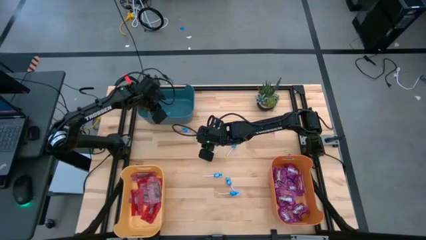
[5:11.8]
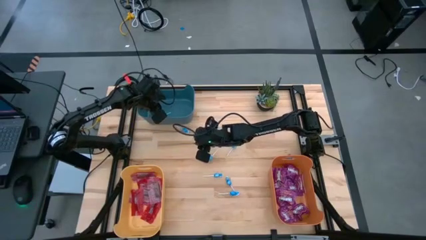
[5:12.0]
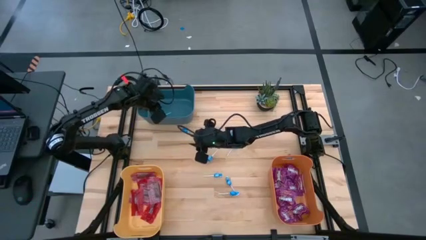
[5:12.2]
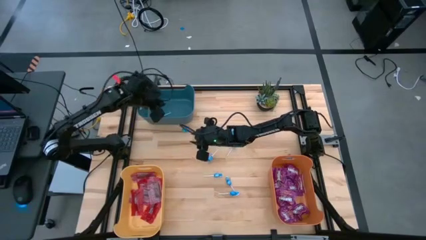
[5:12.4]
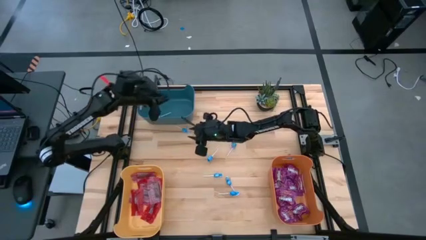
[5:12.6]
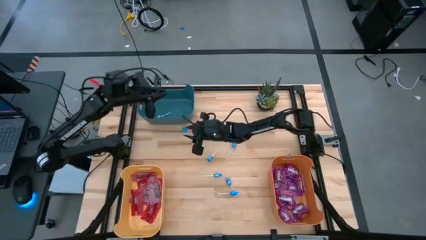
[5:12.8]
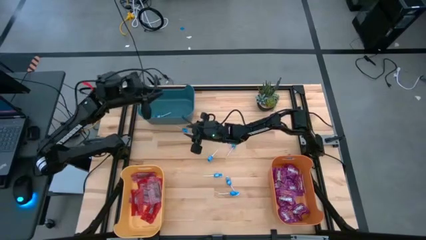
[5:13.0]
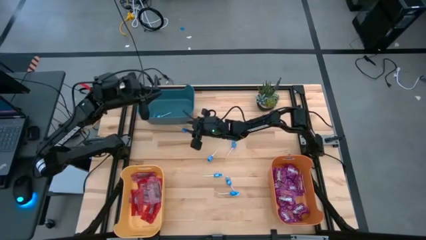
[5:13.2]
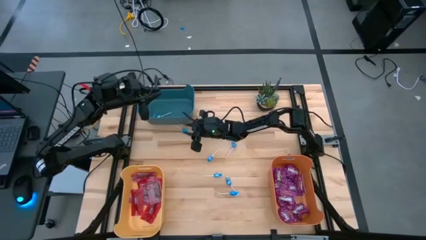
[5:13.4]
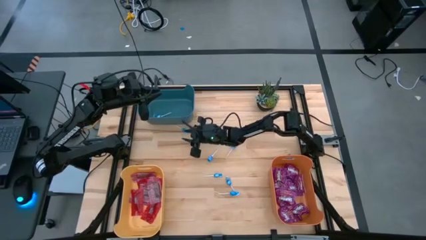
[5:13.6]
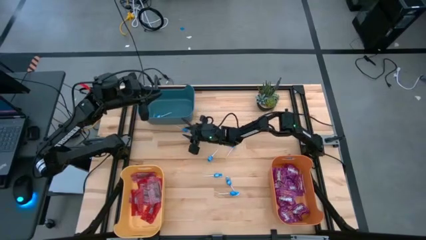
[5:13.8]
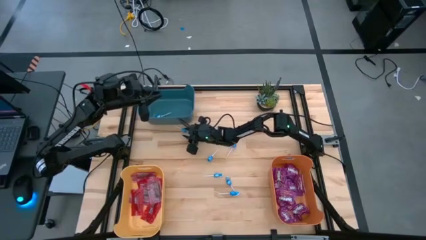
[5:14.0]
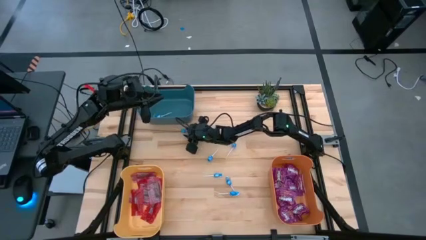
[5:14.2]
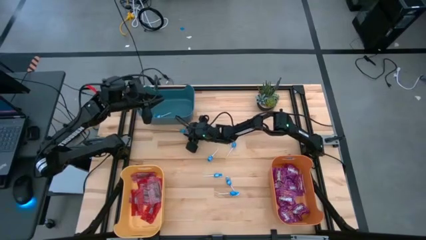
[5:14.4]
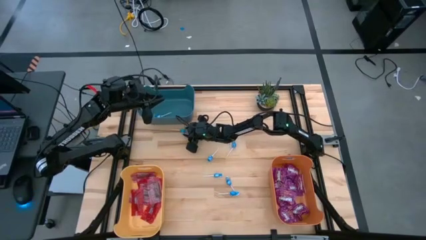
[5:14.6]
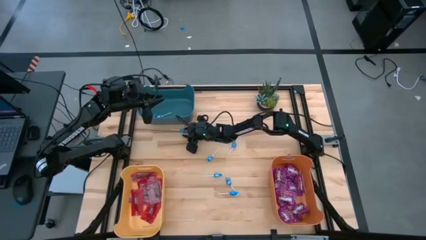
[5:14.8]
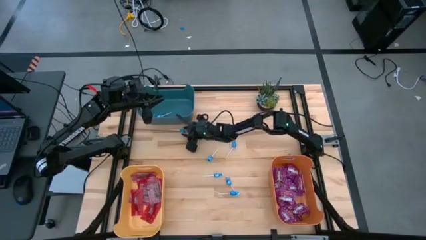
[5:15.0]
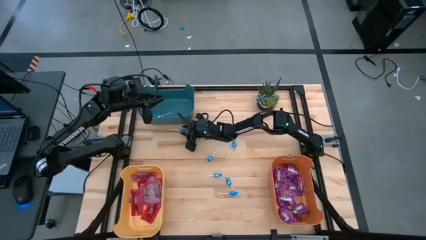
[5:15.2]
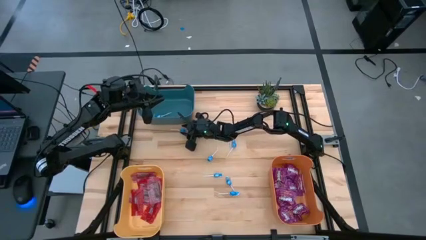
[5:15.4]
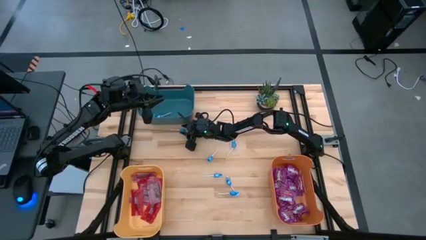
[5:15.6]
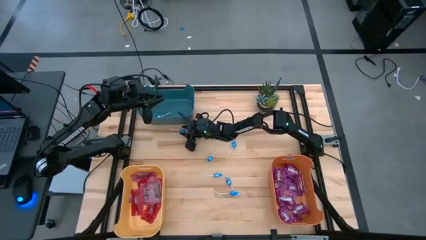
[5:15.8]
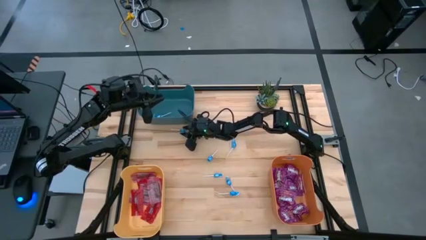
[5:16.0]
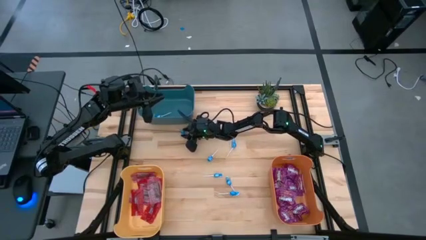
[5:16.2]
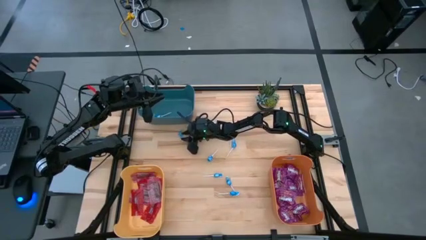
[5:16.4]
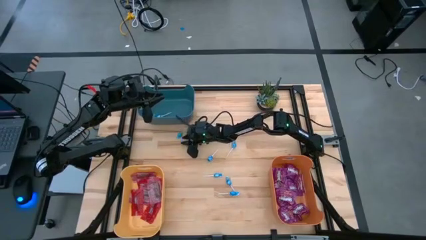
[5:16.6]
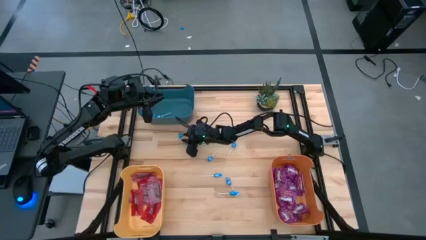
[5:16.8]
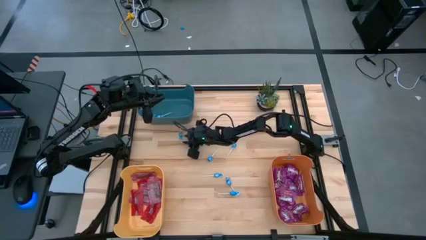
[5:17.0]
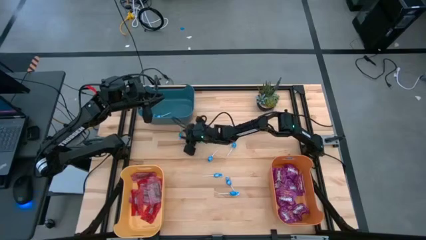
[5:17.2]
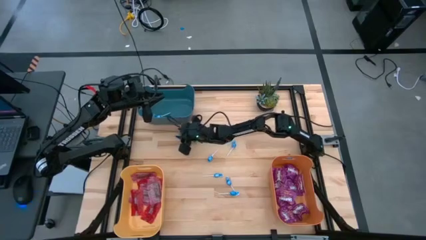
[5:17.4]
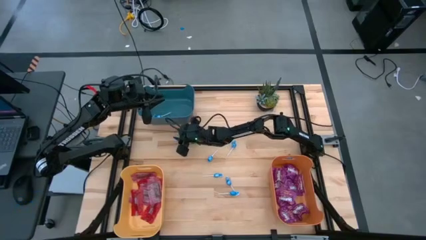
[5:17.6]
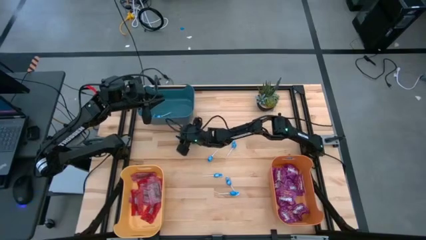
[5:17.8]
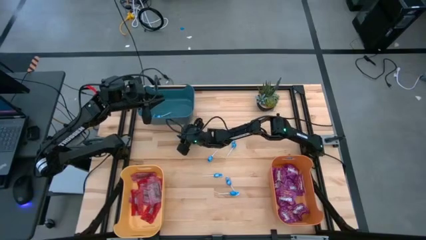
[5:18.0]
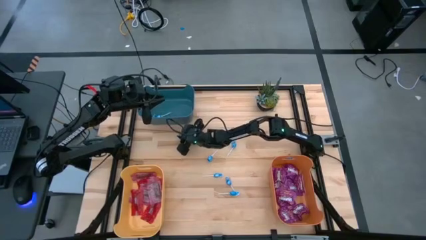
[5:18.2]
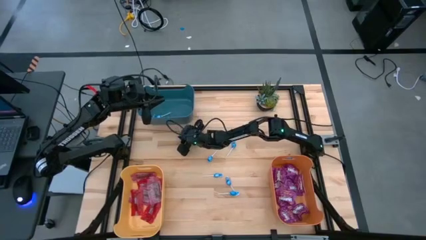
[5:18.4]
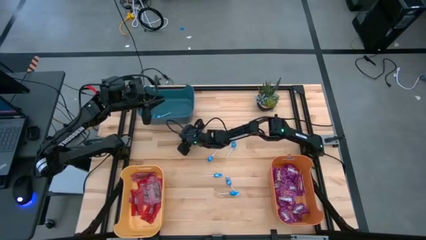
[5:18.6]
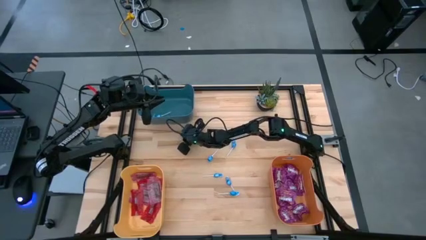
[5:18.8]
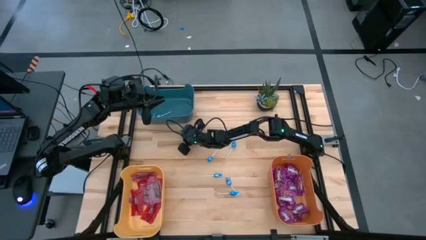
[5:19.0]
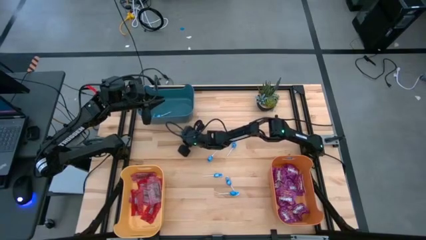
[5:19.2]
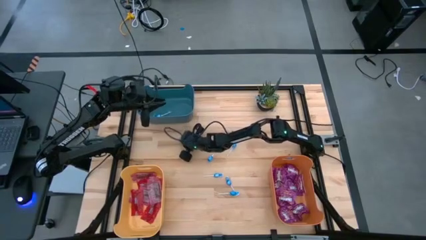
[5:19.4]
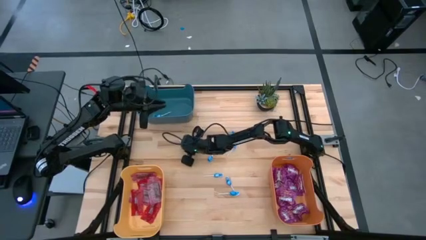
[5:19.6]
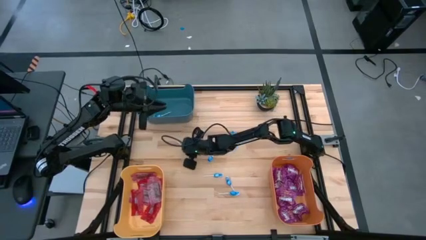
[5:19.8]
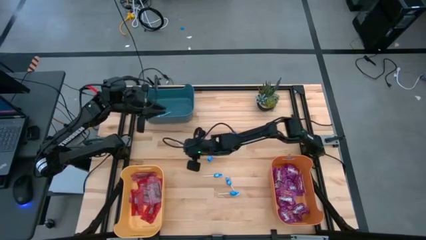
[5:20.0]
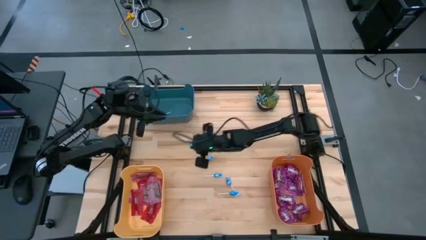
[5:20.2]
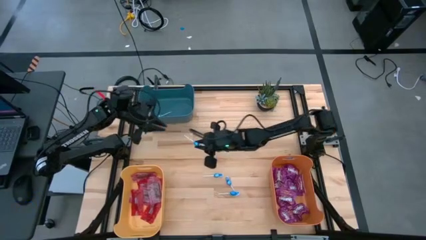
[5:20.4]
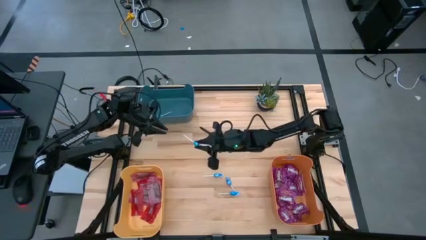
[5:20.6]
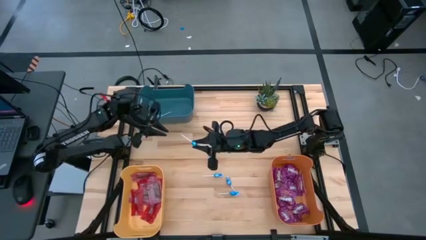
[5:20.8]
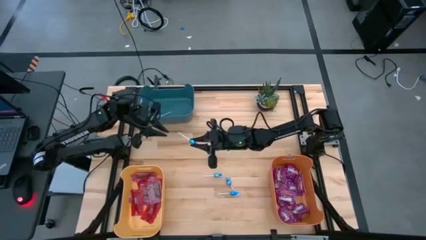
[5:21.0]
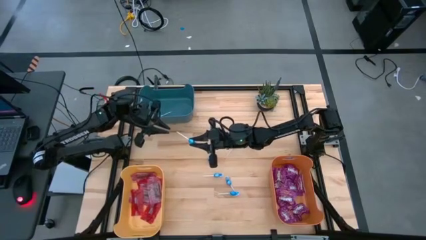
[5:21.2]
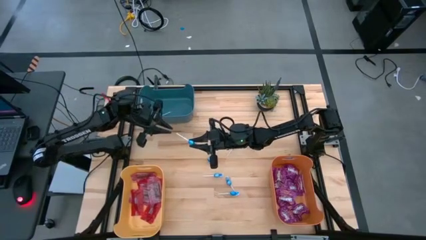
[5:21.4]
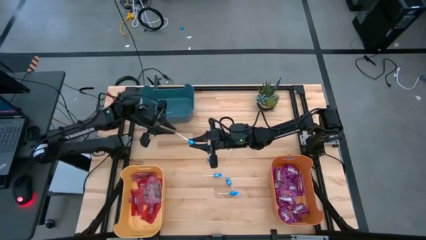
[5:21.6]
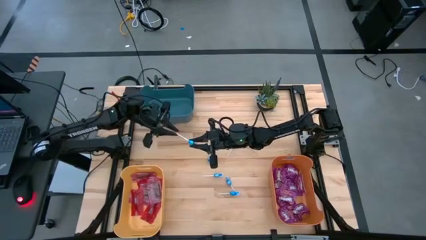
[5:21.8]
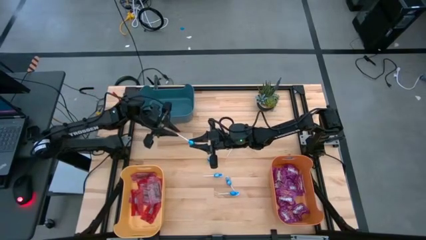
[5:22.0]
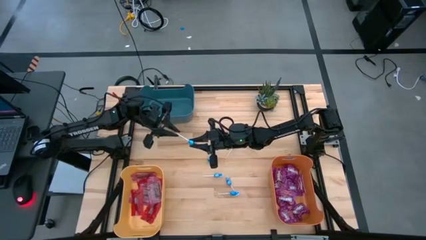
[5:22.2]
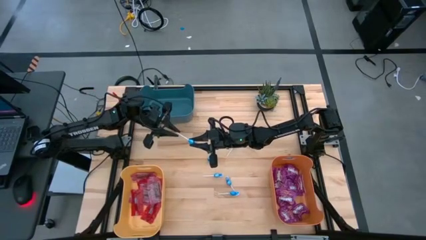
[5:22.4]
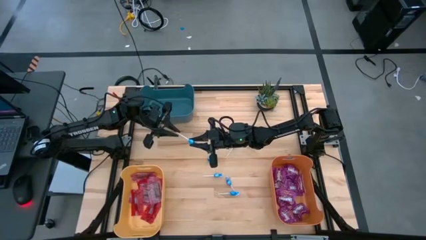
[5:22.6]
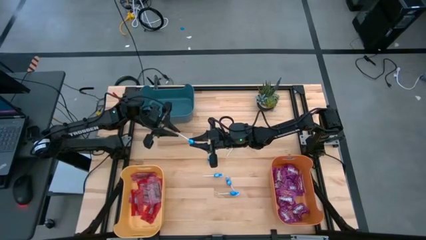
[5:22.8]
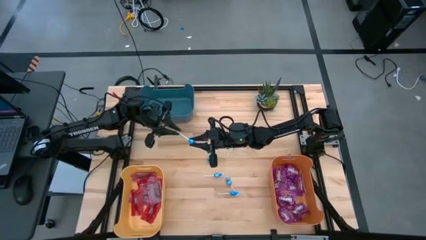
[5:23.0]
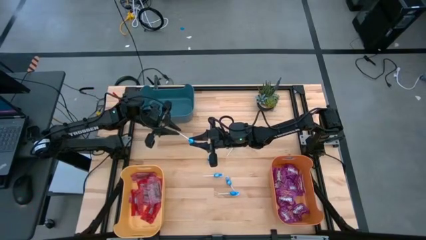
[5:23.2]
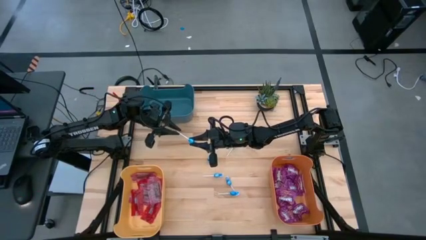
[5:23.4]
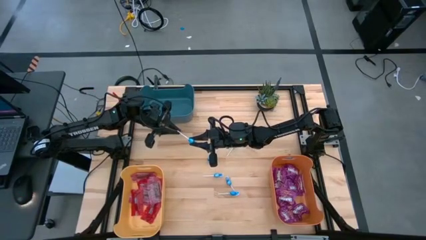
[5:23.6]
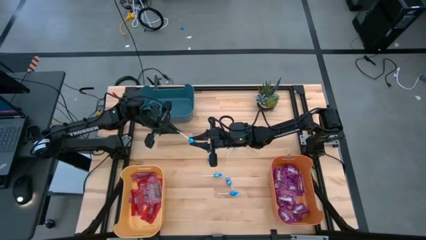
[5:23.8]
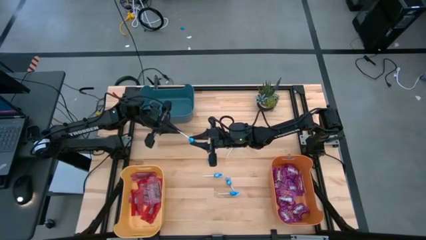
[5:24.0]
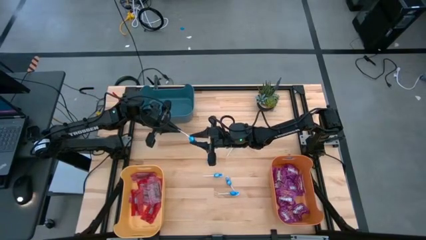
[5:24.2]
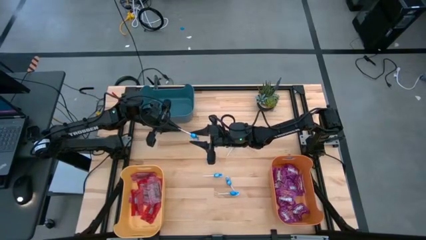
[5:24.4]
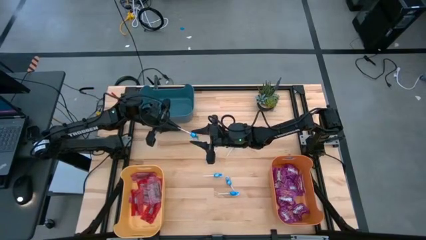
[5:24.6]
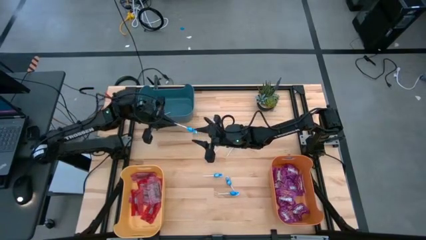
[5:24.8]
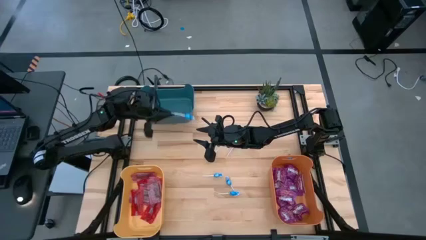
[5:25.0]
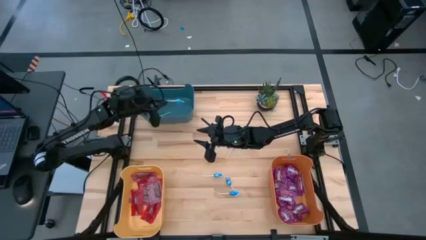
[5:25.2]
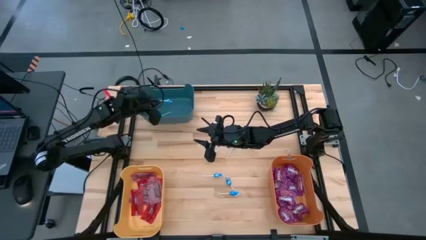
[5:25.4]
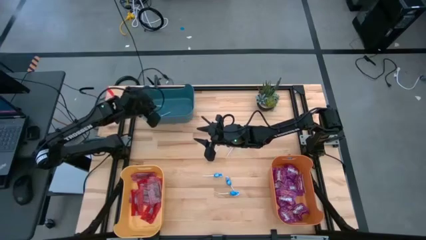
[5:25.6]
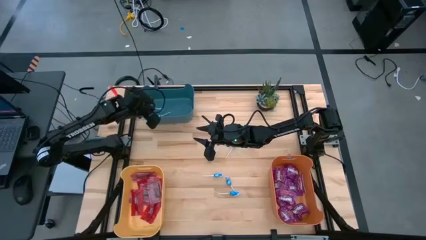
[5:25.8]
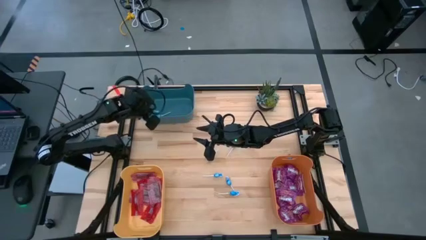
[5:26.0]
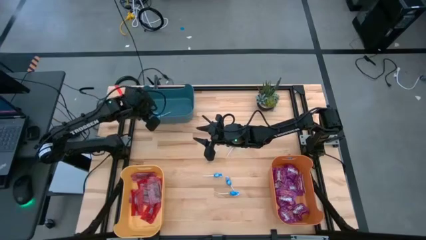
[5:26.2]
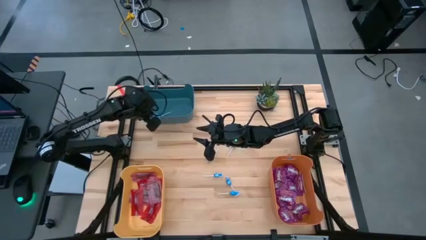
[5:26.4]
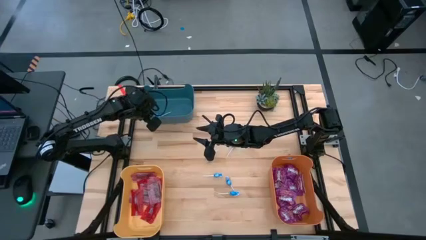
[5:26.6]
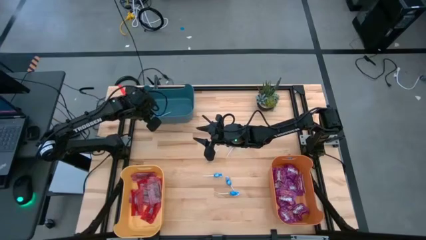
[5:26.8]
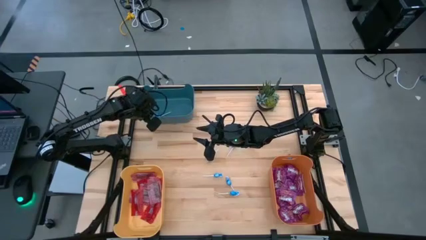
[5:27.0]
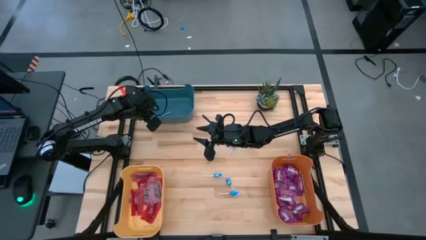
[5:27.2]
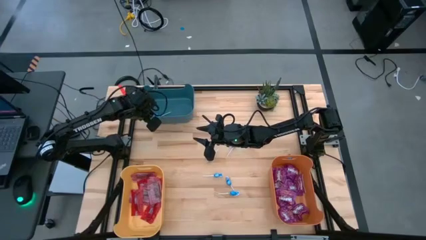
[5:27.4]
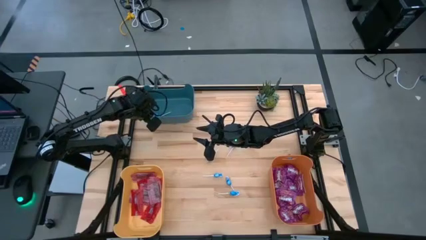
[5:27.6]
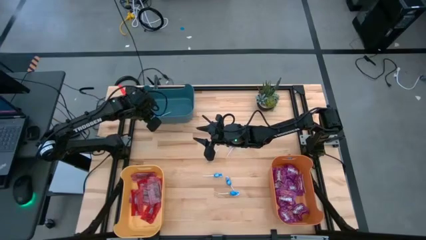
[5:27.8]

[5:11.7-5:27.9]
Task: Sort candy
Put the blue candy into the blue bin

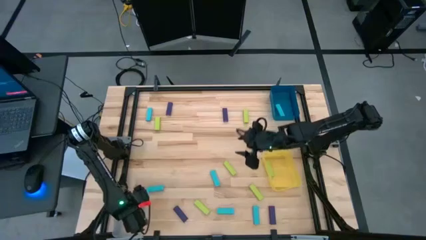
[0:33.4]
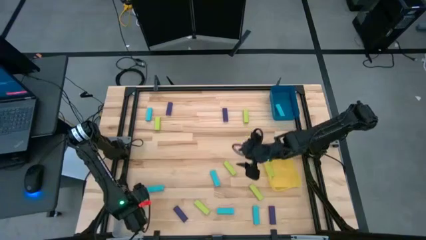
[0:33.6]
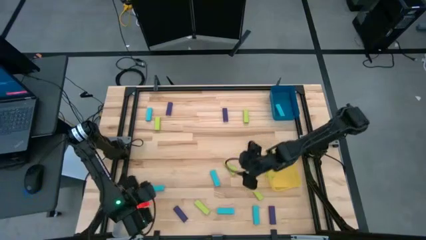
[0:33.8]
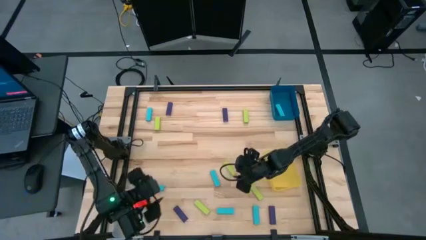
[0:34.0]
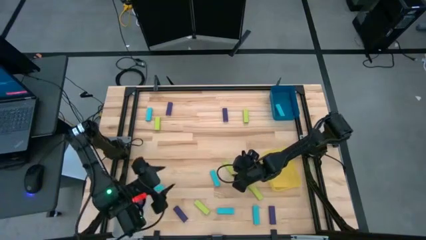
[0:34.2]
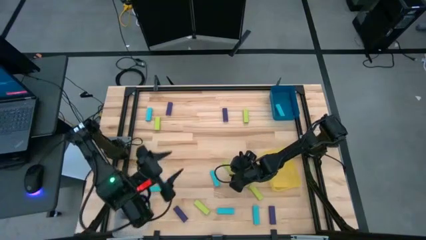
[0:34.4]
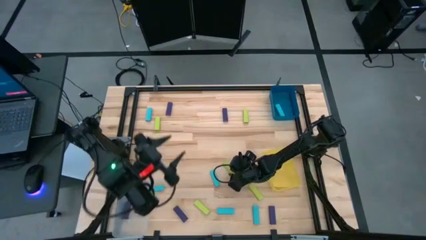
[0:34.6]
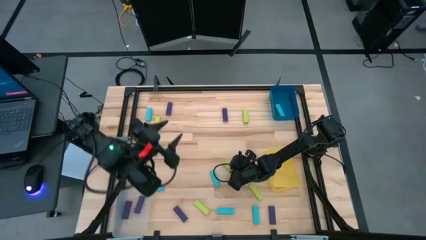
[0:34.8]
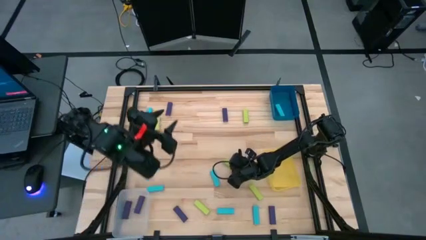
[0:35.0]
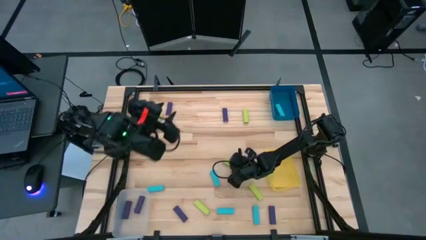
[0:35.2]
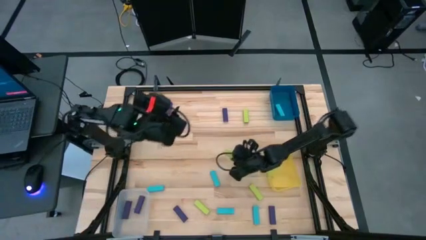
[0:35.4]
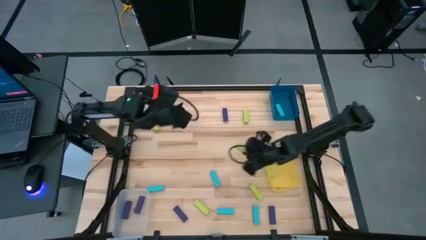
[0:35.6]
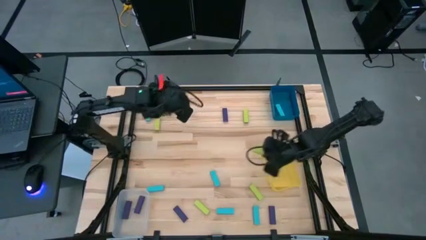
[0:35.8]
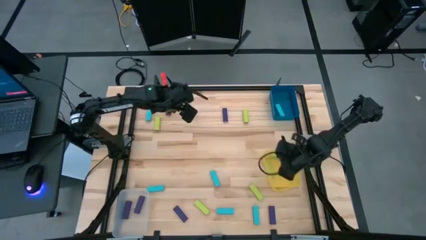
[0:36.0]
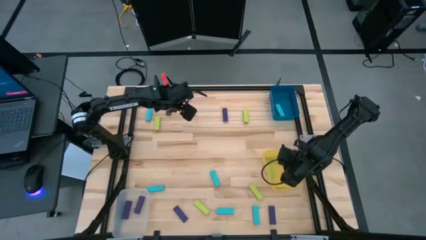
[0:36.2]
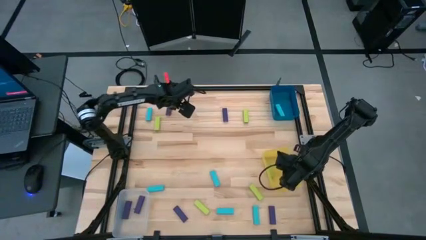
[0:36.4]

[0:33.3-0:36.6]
Task: Sort blocks
Put the green block into the yellow bin
